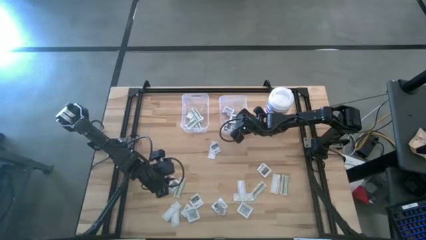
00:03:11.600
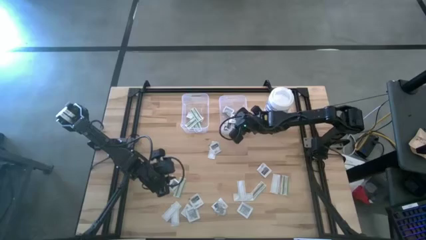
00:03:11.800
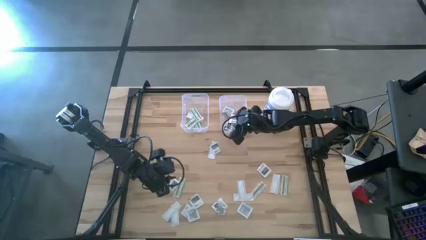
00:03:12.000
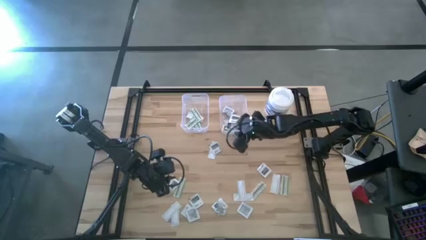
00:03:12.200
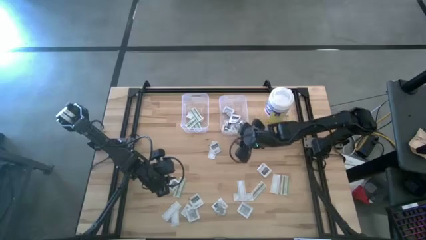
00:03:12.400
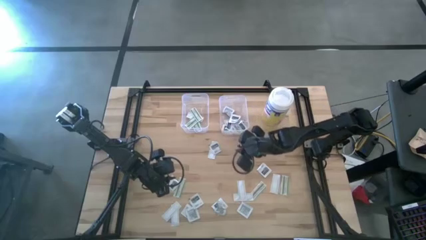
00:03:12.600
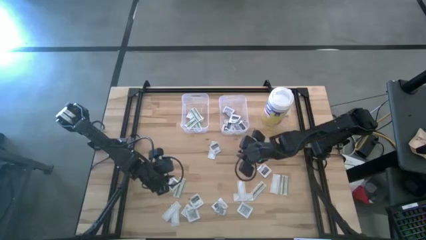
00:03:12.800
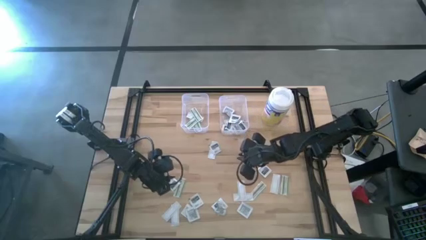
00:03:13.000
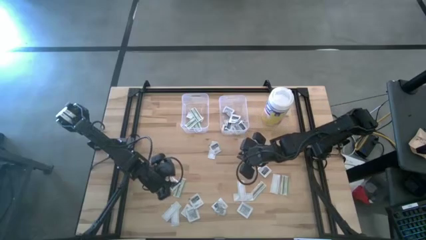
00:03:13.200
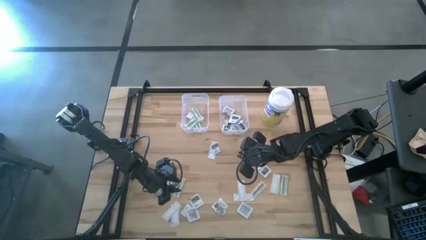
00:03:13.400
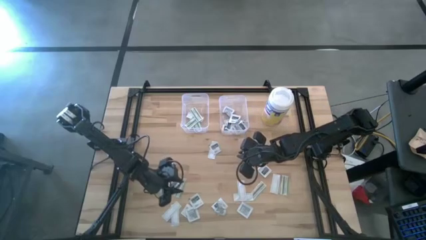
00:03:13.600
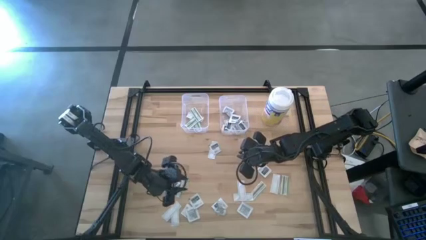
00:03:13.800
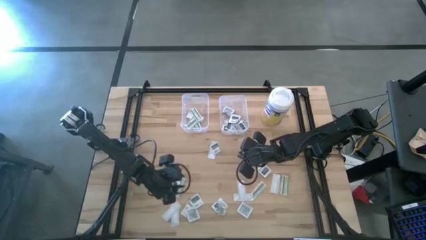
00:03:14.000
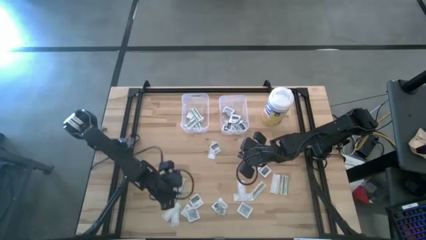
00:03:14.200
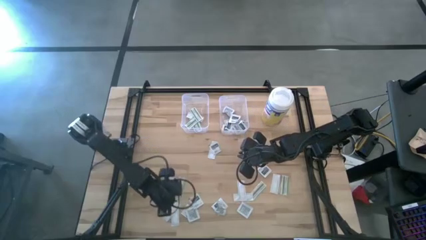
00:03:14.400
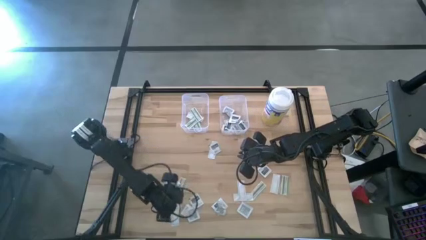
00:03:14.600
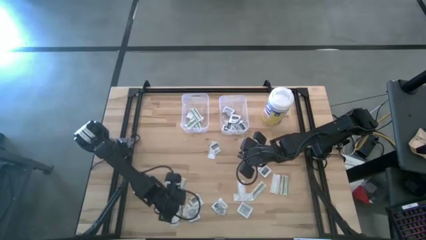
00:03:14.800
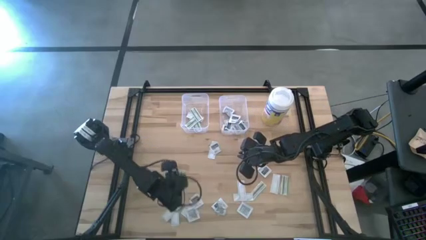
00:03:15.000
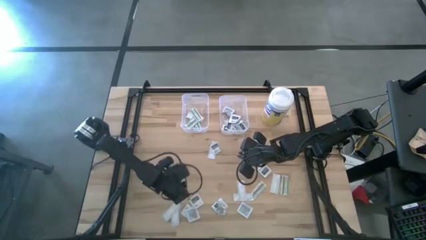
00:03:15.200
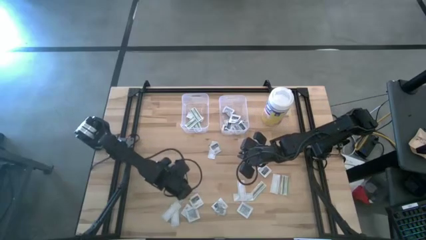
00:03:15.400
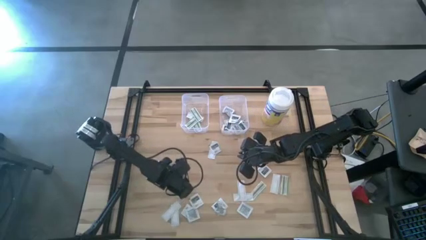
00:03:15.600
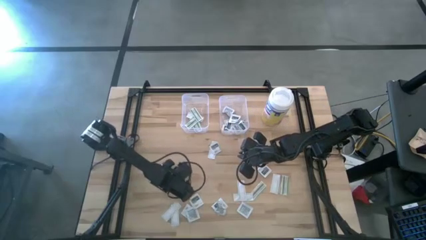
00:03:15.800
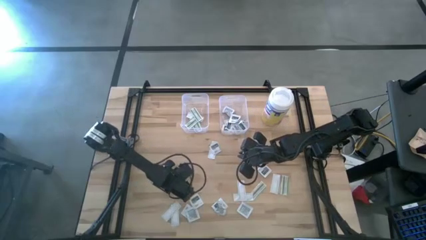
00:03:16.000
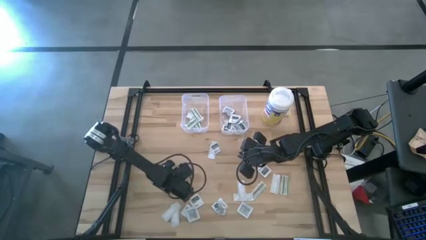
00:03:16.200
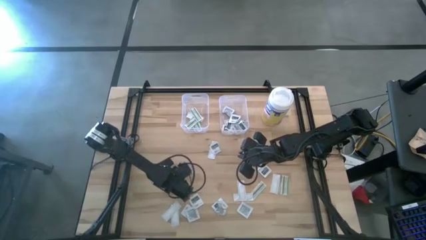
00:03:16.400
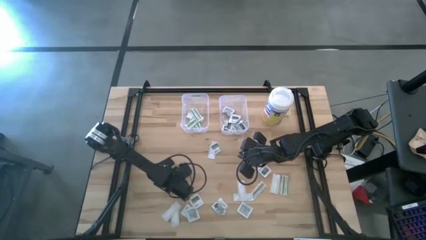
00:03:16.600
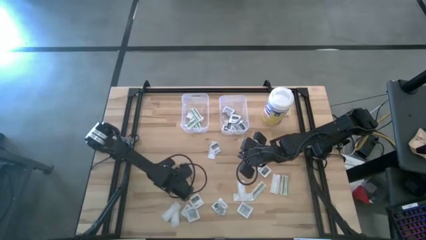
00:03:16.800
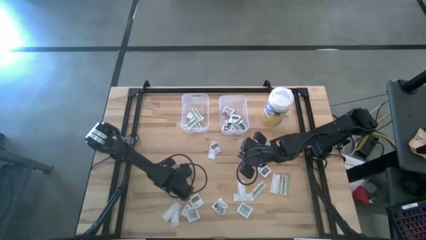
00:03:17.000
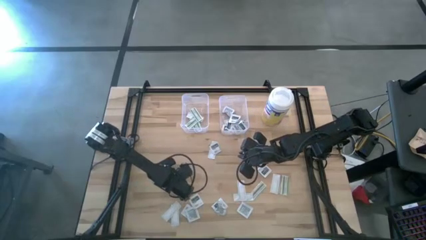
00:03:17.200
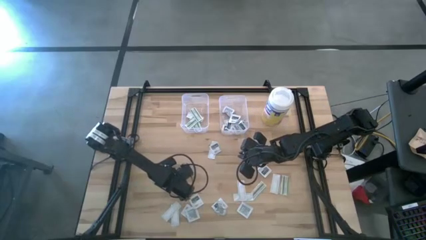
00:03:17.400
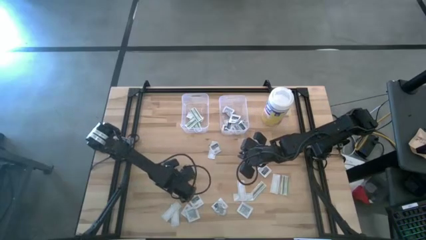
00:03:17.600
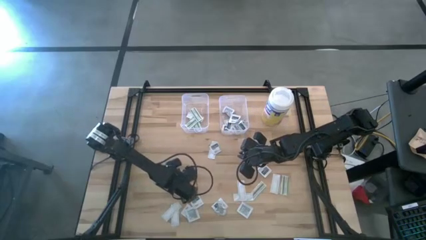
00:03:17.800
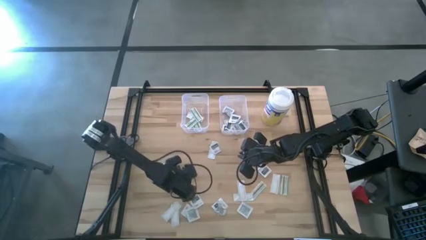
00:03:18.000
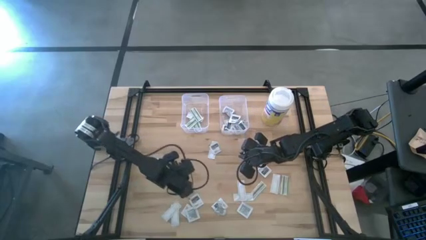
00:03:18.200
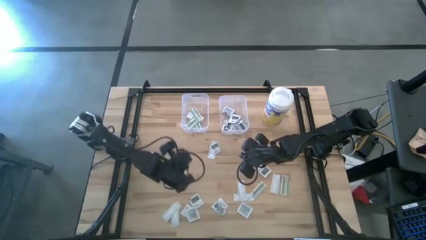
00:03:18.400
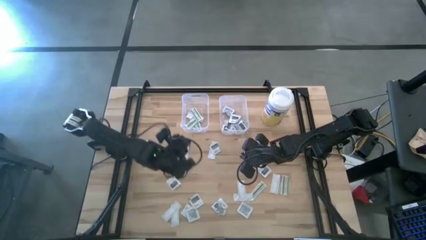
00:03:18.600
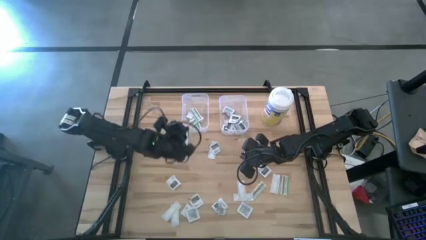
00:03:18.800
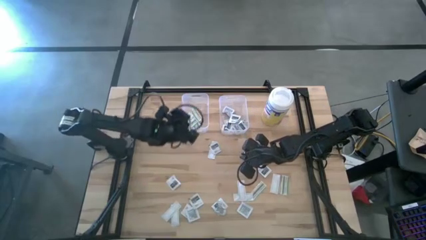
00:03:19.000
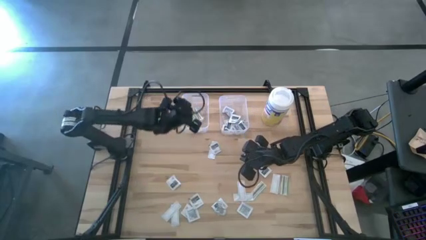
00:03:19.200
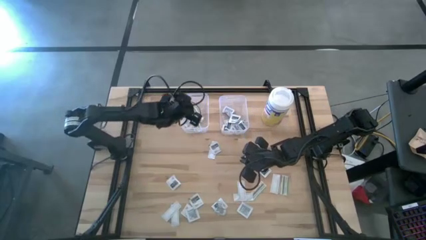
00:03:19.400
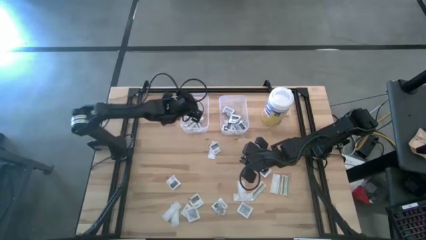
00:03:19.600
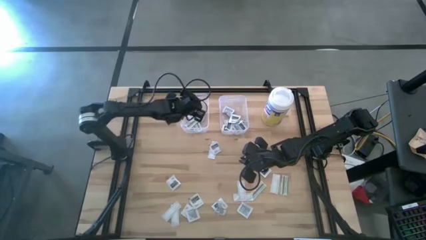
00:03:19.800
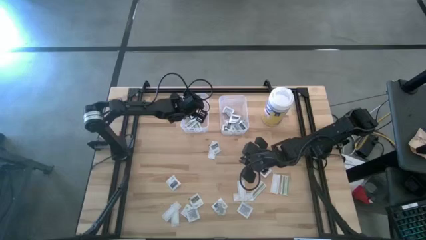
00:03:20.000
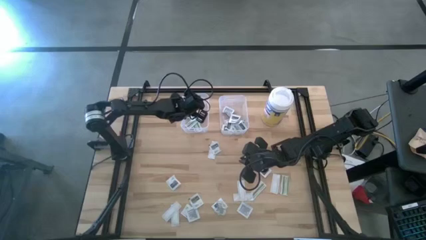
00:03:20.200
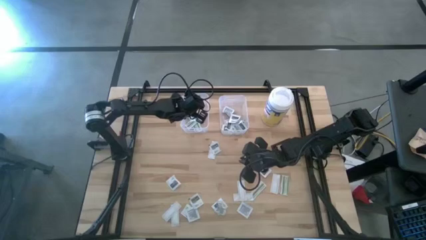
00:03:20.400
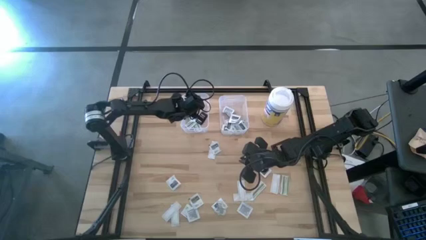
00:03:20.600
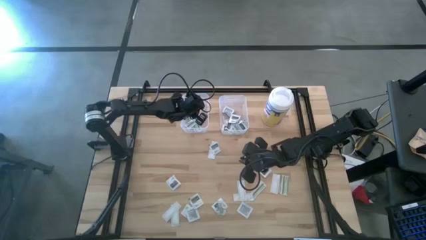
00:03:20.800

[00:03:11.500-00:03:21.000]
Task: Pick & Place First Aid Supplies
Put the green bandage pack into the left transparent bin

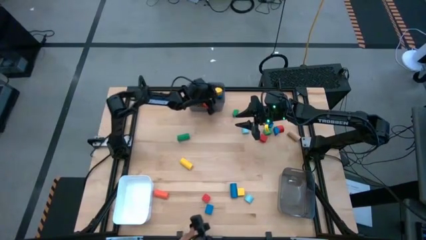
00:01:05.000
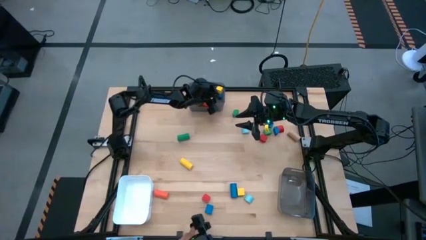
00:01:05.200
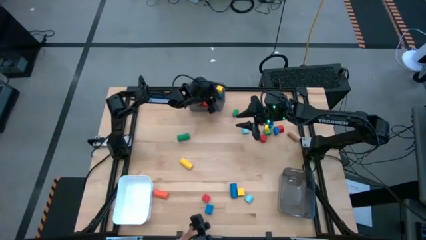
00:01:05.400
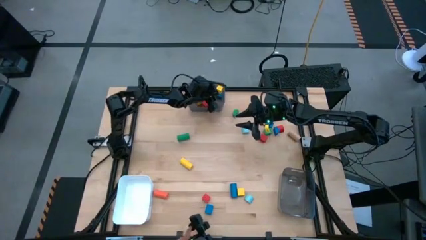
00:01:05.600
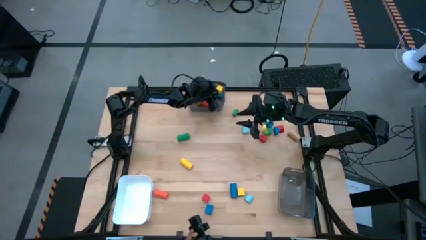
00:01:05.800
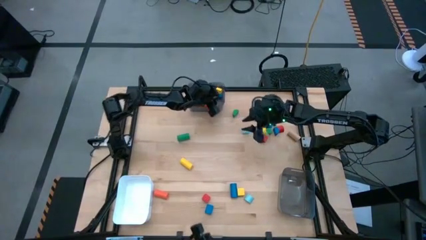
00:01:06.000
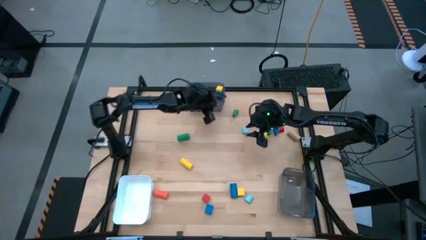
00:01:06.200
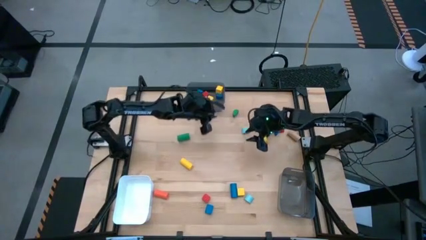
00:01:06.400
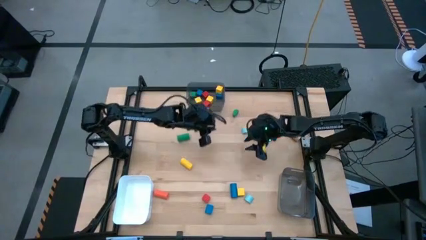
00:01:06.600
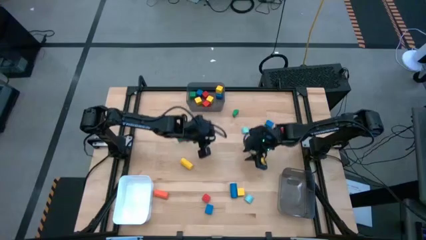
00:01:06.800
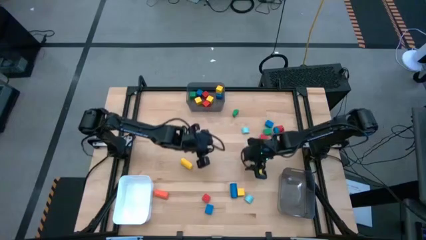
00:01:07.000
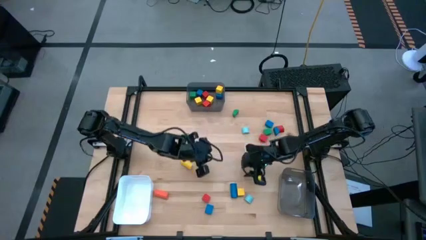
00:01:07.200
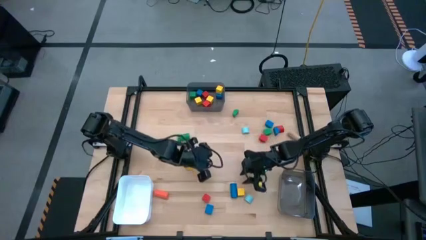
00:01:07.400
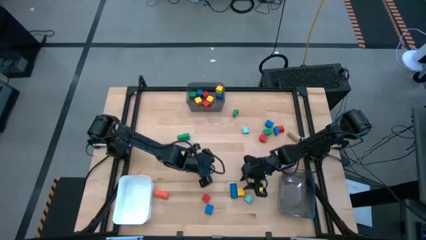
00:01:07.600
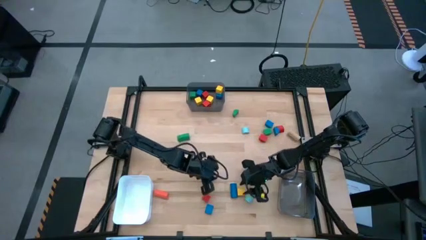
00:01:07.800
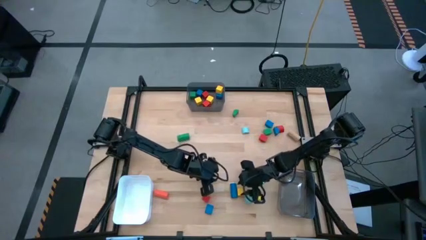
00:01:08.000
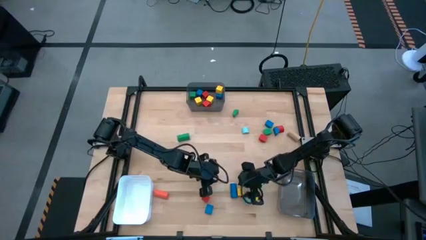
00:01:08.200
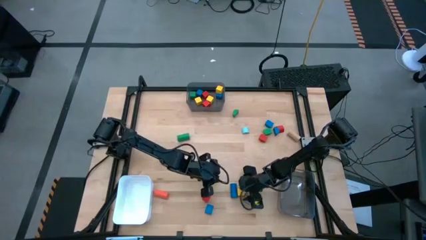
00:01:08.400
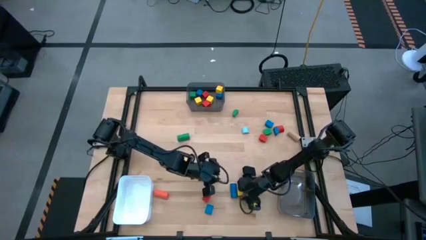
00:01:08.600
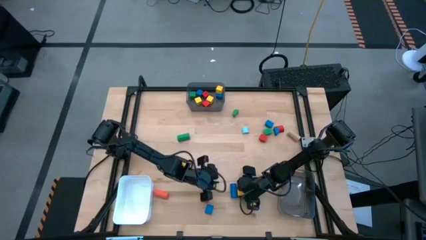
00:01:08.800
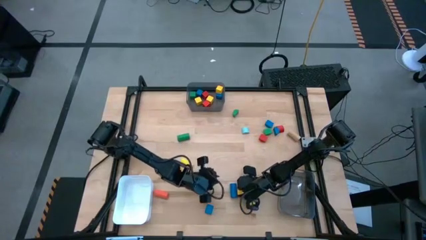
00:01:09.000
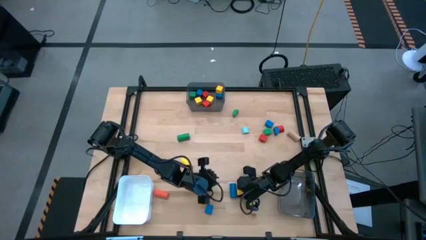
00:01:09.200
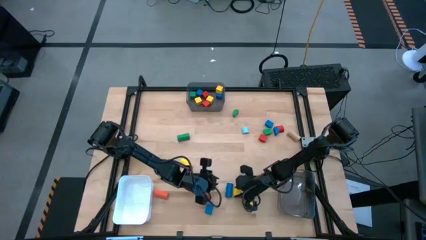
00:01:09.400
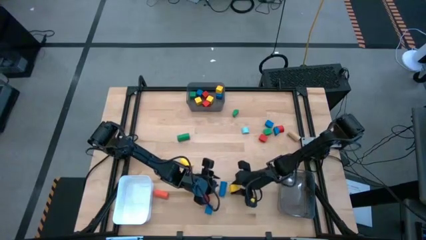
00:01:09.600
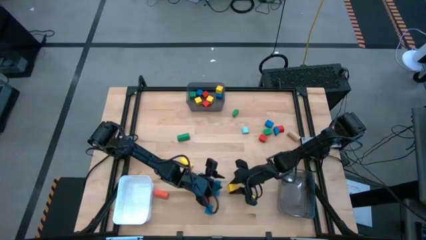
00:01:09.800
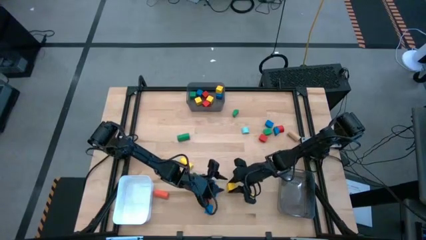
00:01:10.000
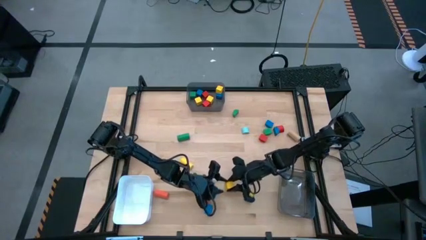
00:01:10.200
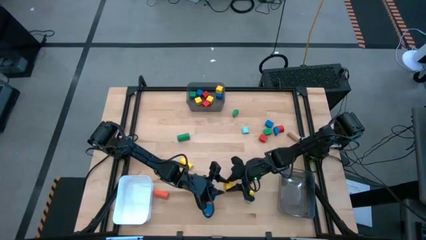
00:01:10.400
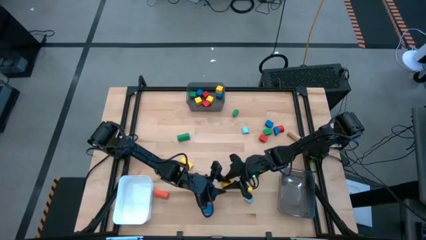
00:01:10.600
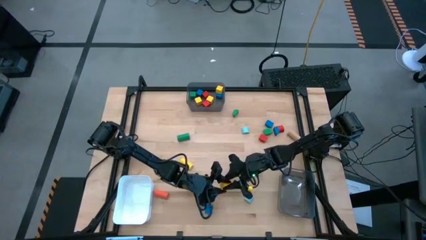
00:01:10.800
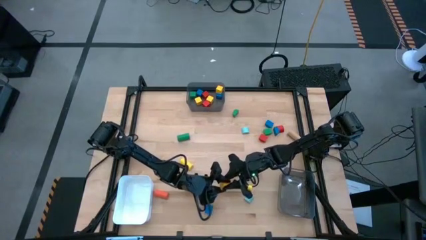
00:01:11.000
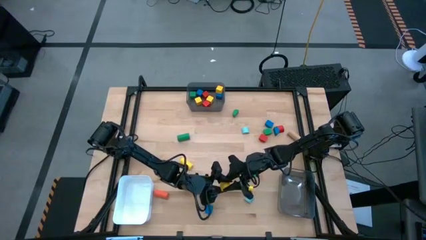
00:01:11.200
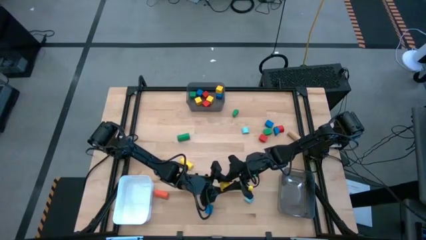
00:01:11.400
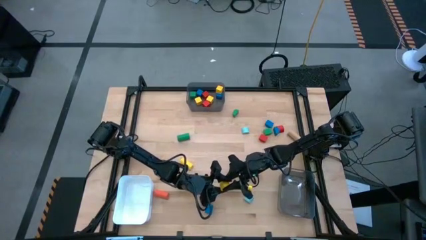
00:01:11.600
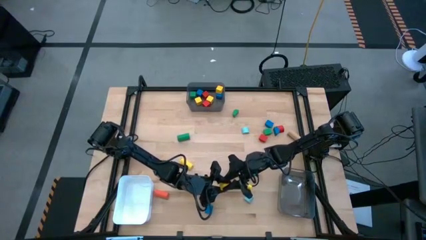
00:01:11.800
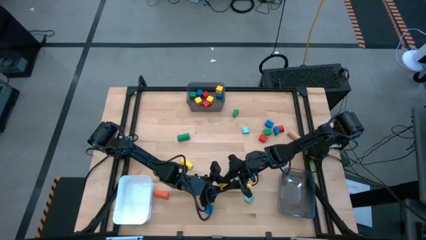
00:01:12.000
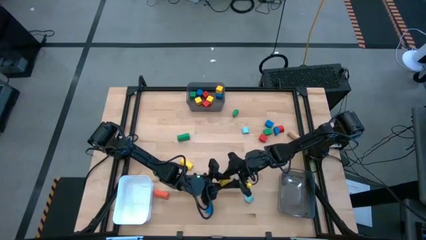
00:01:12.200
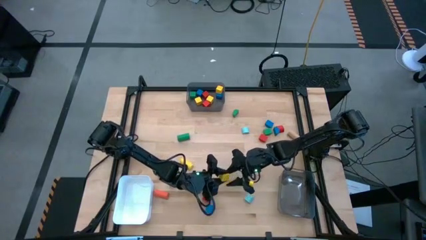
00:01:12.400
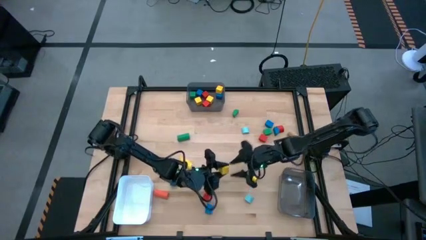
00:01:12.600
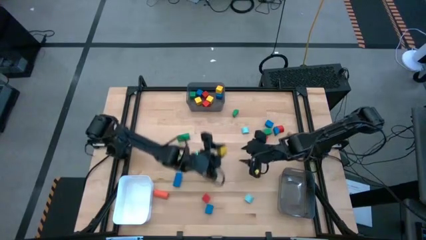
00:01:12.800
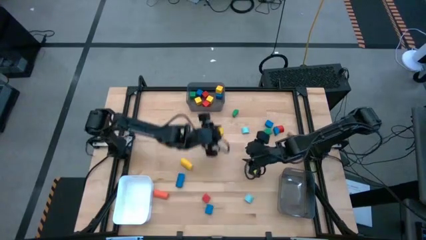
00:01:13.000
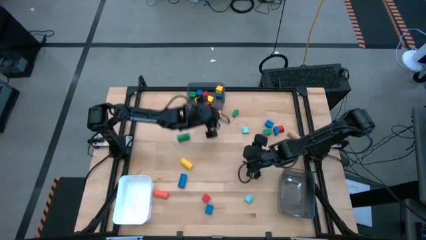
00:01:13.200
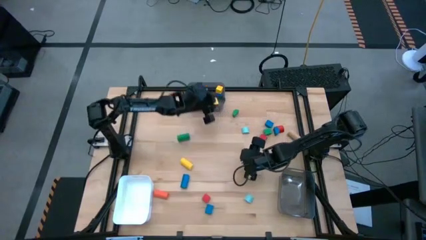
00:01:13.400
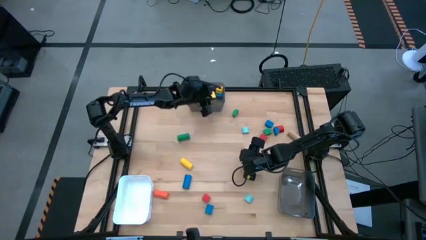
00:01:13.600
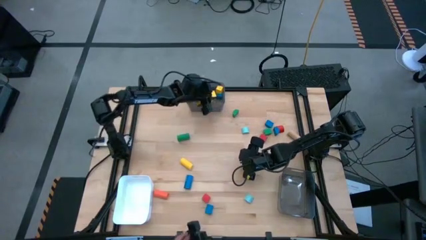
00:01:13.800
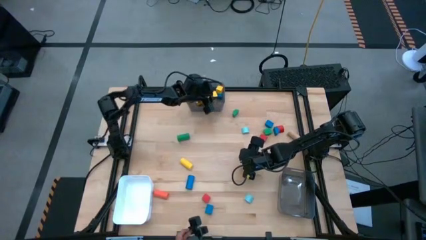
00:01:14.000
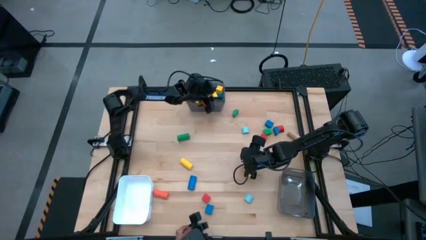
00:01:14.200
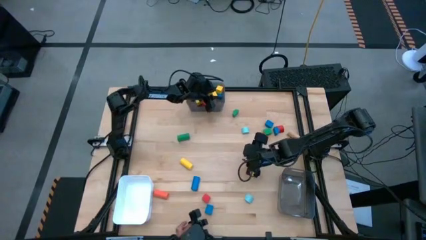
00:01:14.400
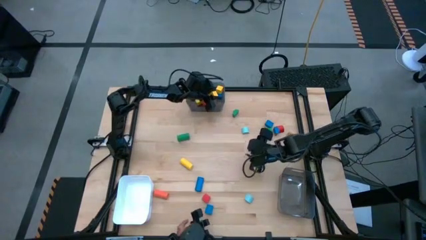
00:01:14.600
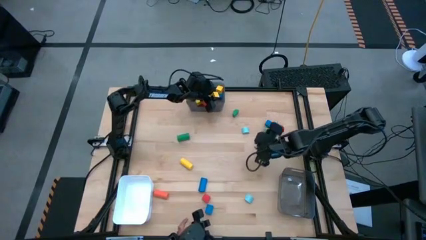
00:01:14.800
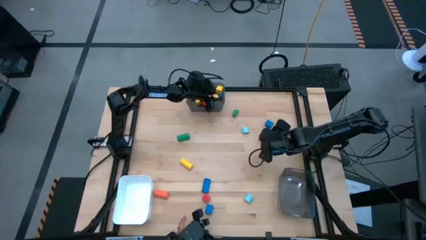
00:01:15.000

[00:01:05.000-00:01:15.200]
Task: Sort blocks by size
Put the yellow square block into the top black bin
